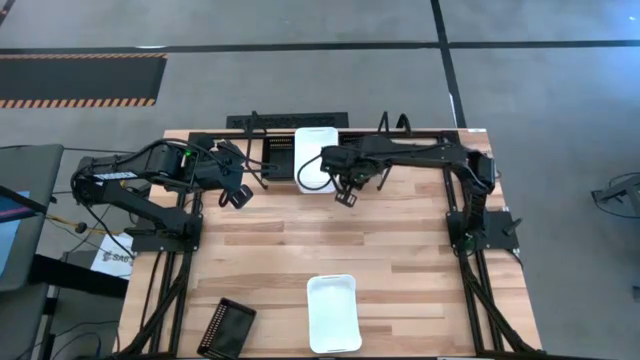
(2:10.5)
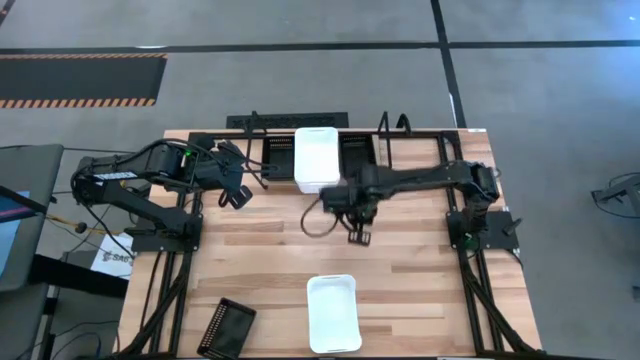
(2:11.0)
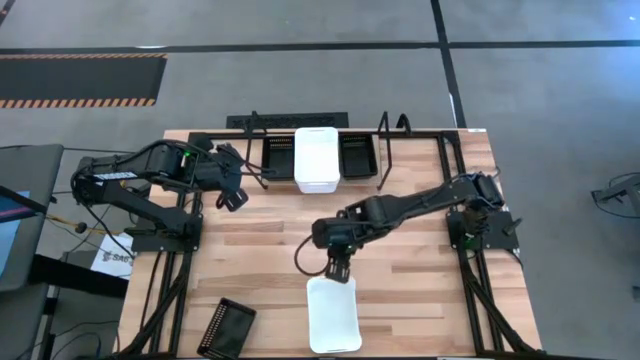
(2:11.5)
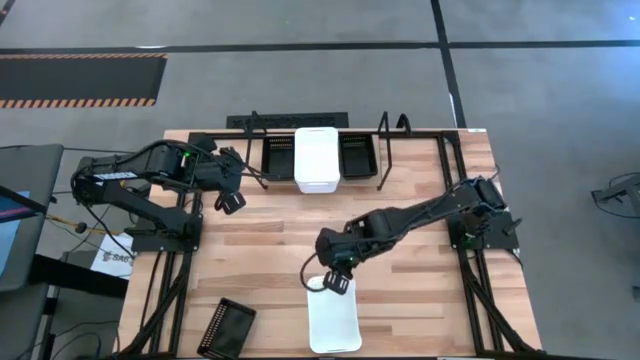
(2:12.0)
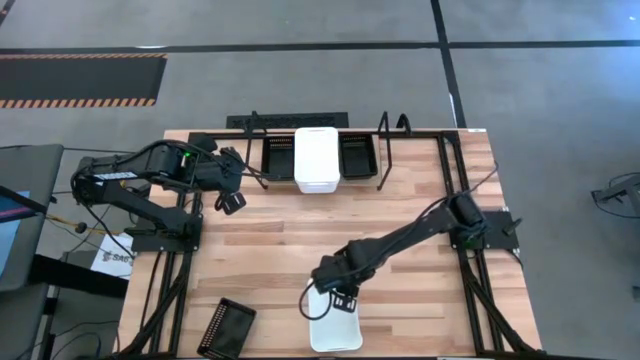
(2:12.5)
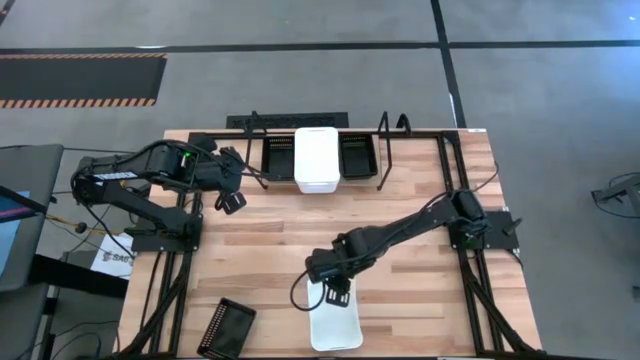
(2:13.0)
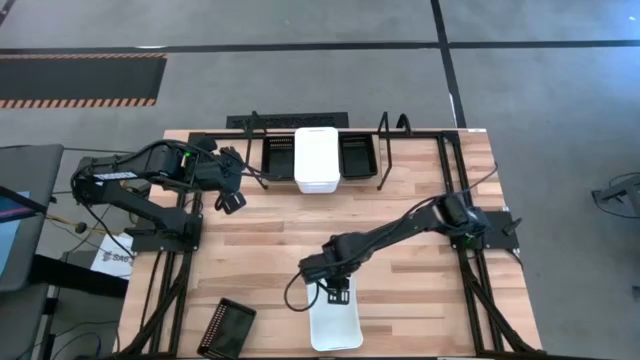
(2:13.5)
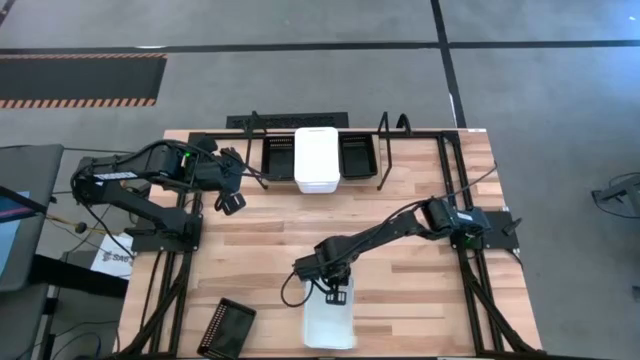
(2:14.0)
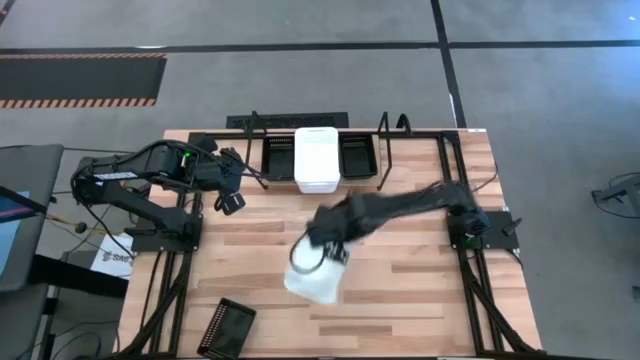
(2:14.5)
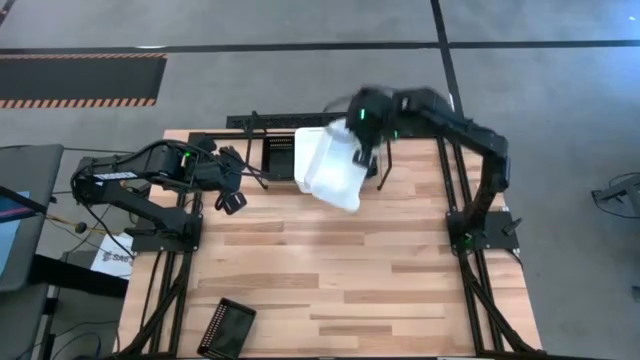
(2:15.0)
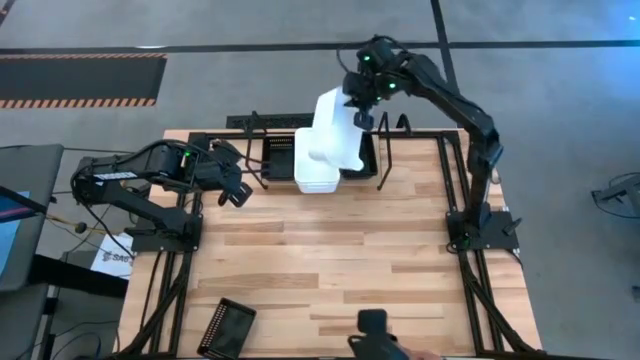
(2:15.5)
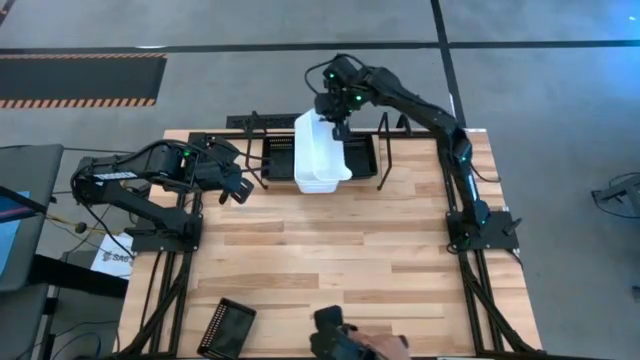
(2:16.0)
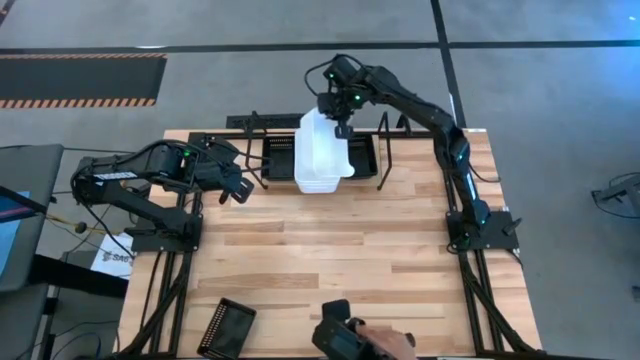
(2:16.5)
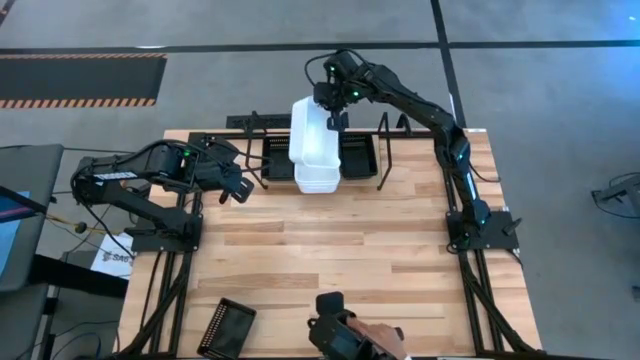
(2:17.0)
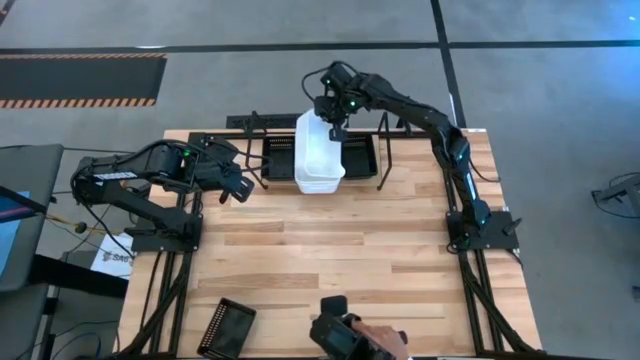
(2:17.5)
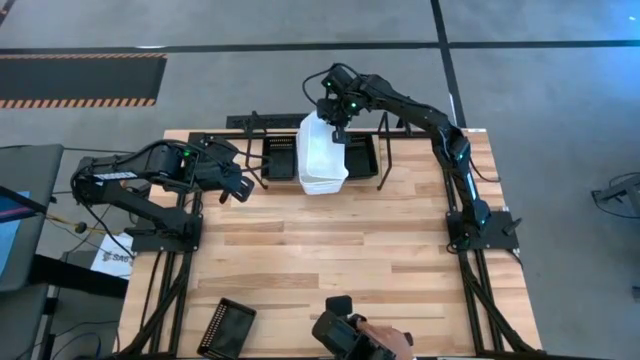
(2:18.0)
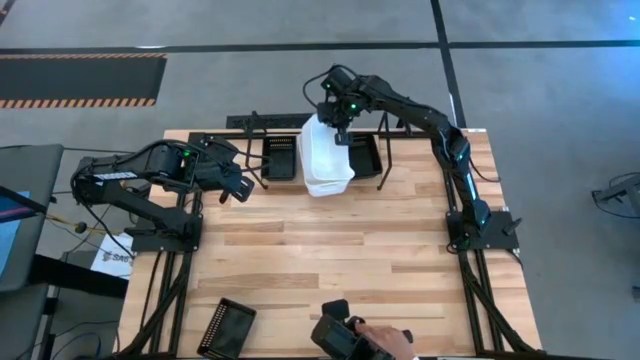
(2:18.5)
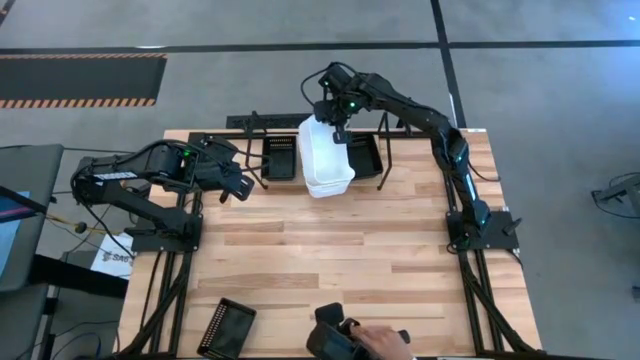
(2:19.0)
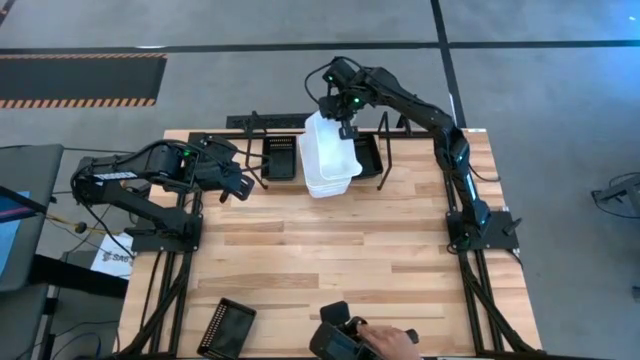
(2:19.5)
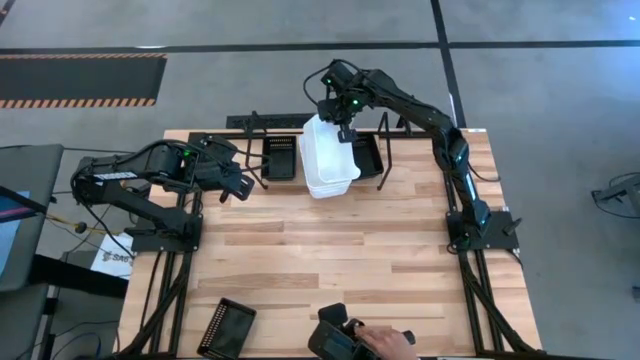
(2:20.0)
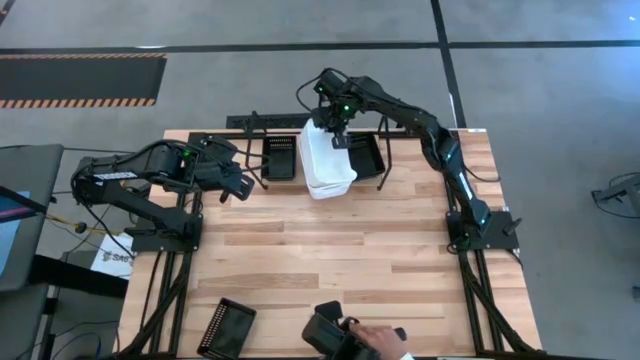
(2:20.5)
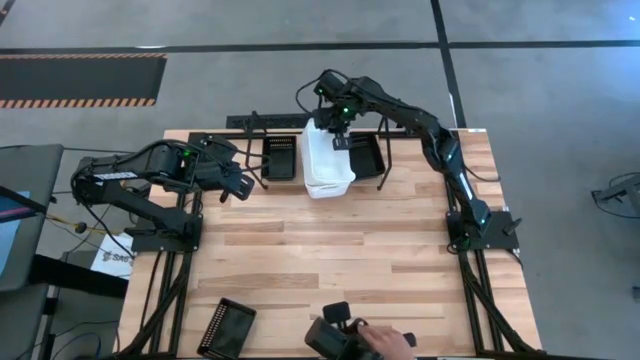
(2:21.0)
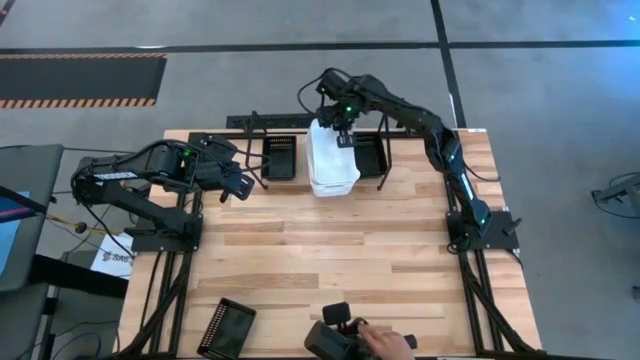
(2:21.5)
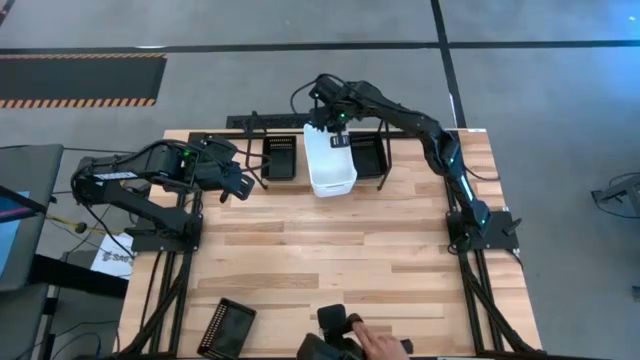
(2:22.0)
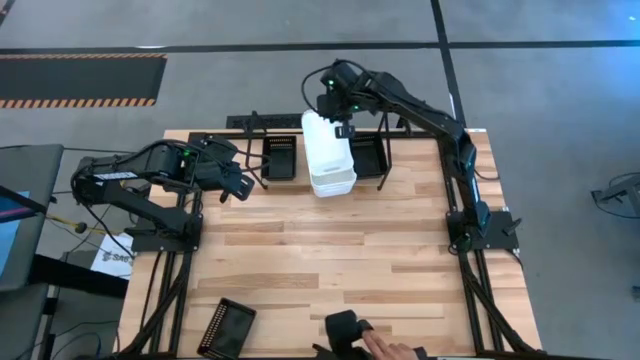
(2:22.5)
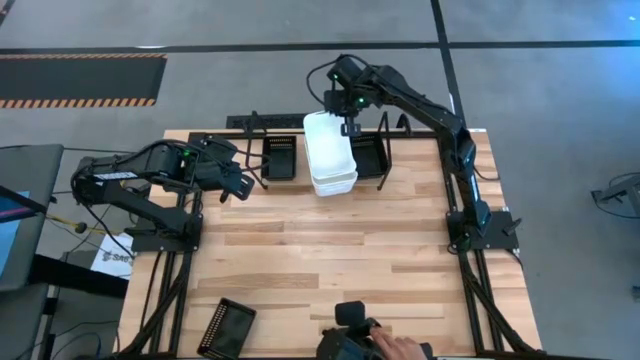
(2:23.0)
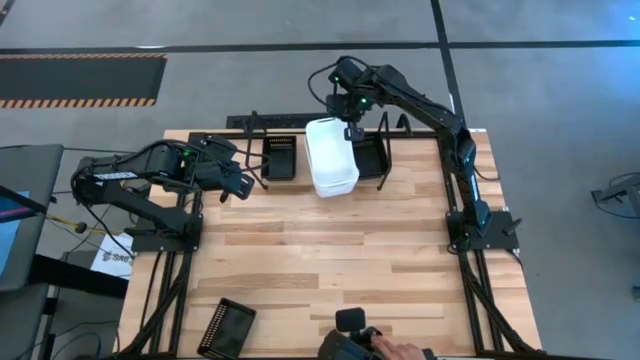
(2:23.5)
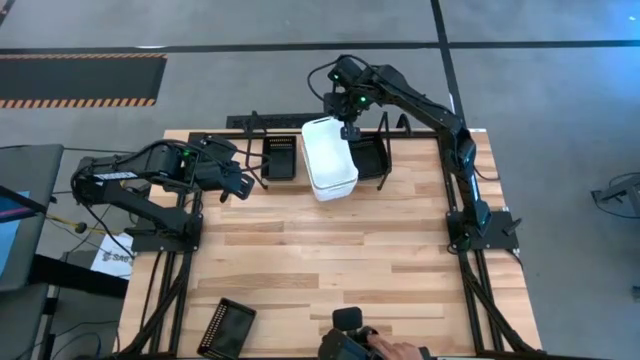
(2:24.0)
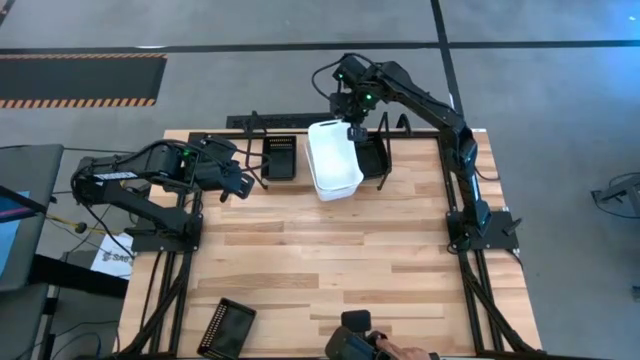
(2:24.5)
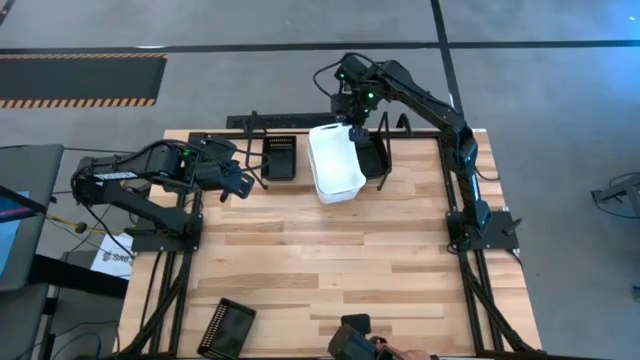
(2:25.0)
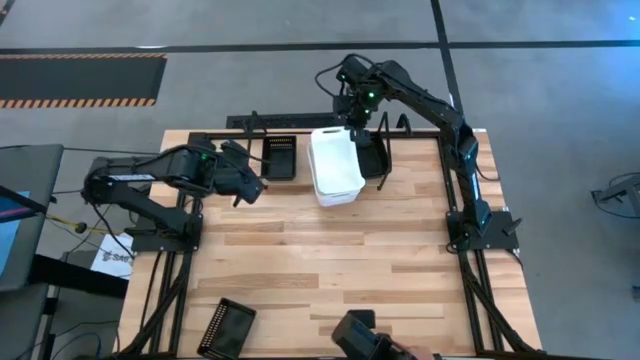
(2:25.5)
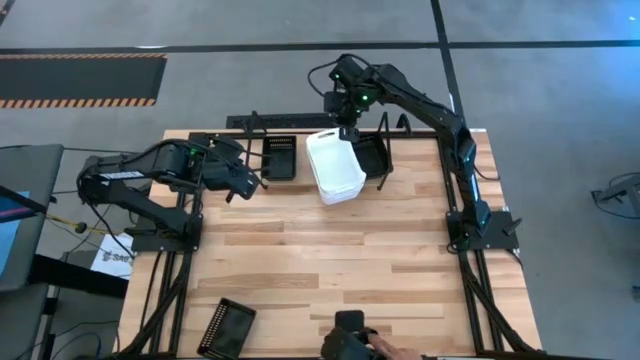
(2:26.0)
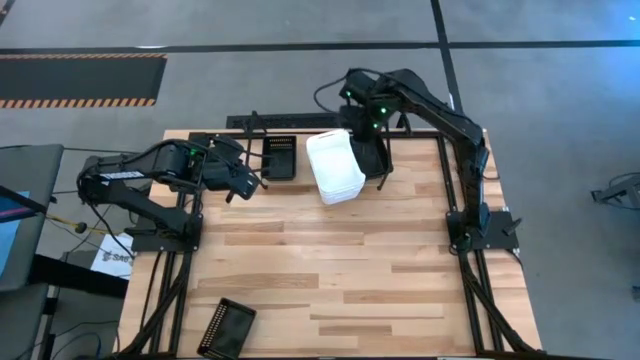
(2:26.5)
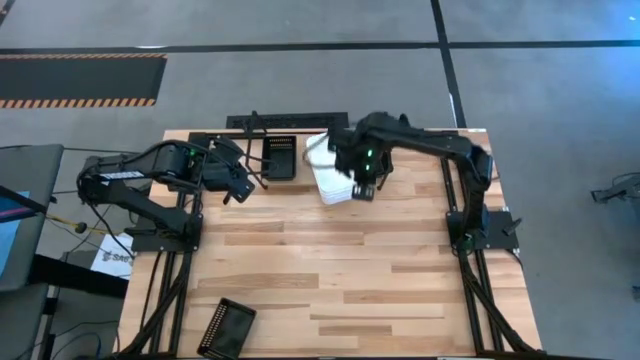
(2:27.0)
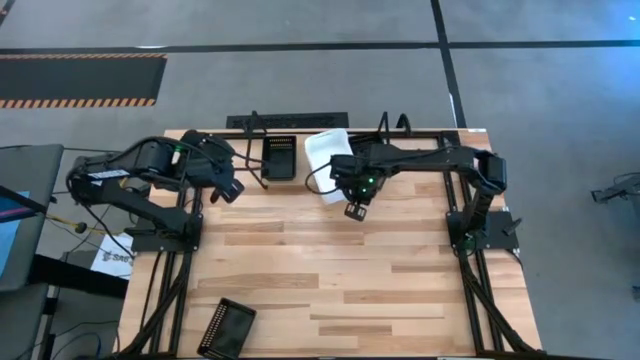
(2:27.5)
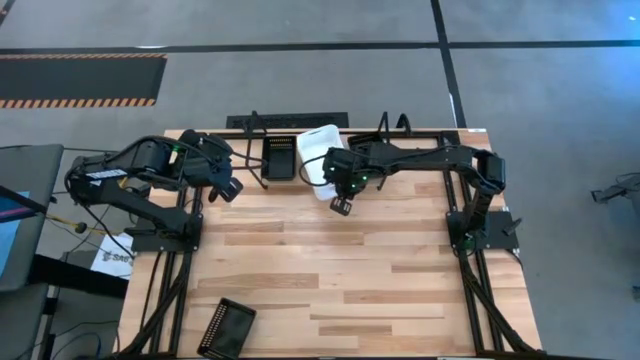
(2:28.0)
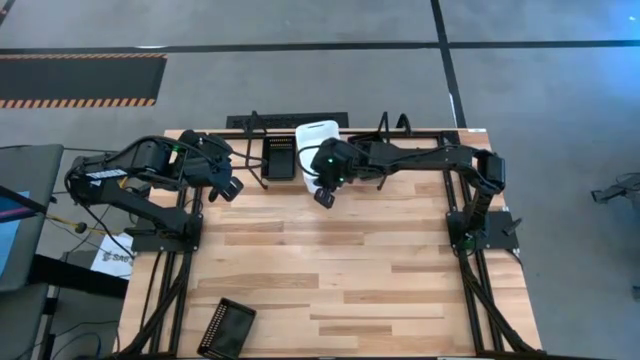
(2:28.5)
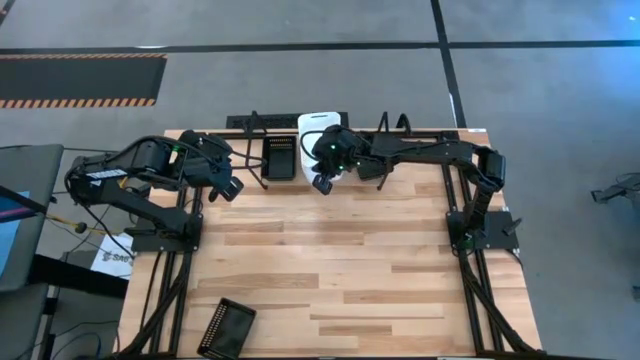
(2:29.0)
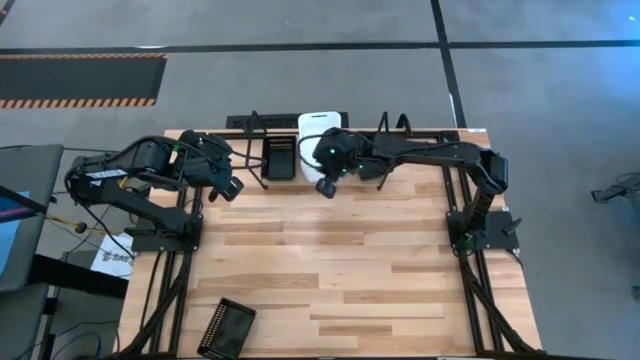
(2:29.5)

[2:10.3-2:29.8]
Task: Stack baskets on shelf by color
Stack the white bin on top of the white bin on the shelf

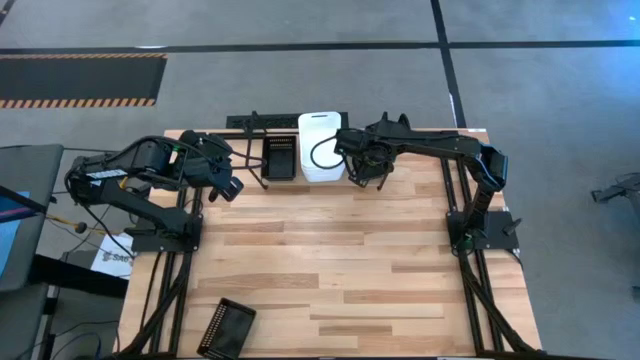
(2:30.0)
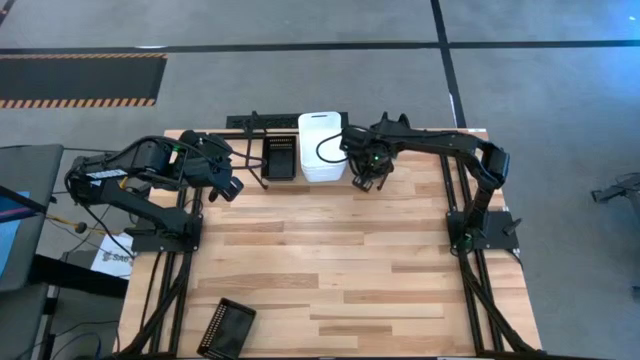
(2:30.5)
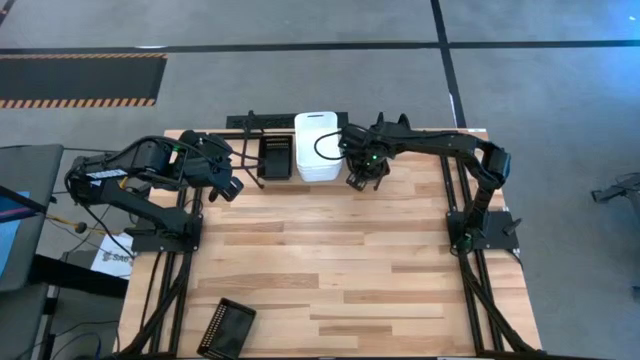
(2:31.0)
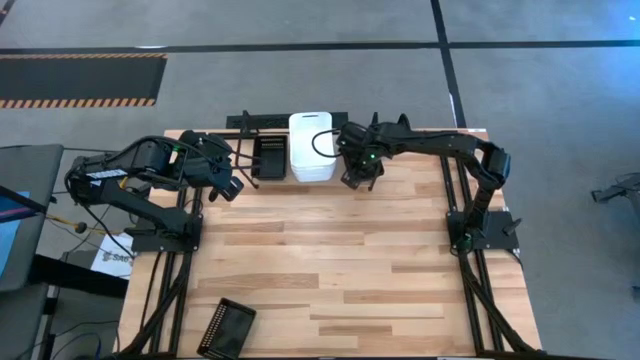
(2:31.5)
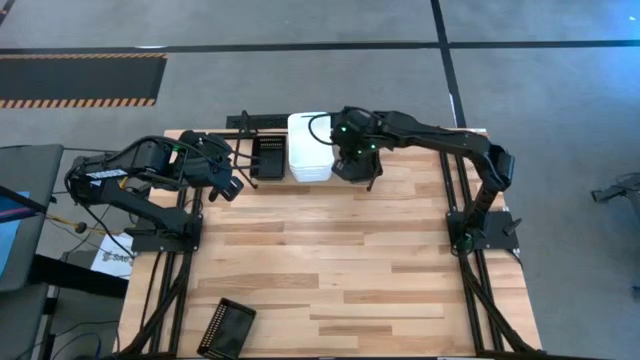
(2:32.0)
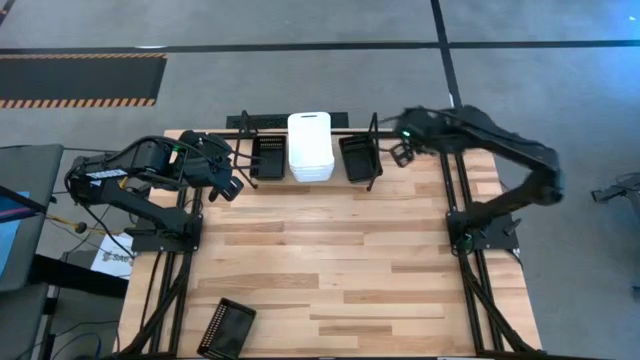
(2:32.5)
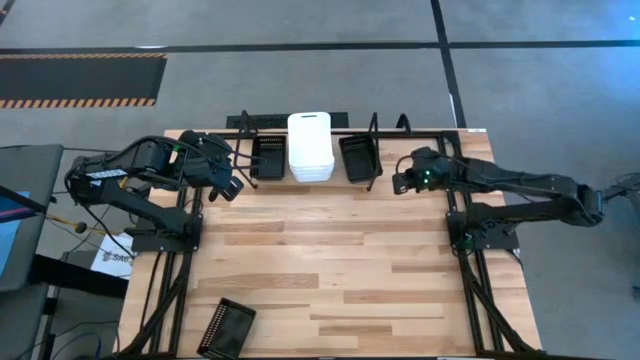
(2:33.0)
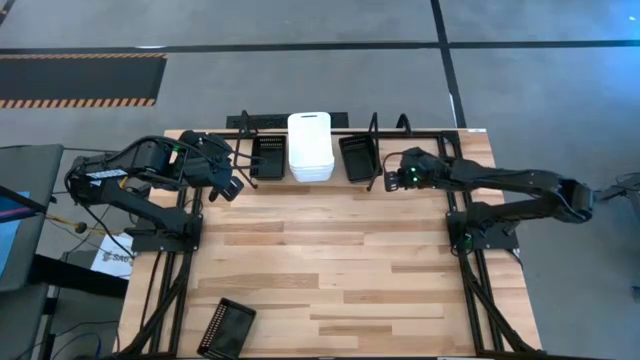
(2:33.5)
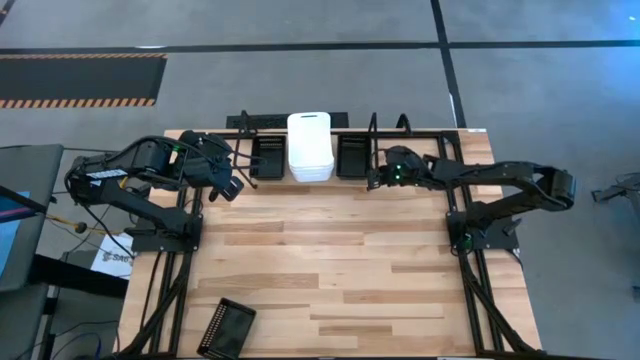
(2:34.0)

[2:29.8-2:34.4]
Adjust the stacked black bin
